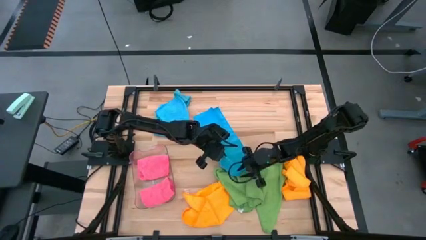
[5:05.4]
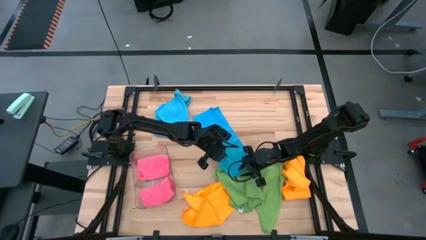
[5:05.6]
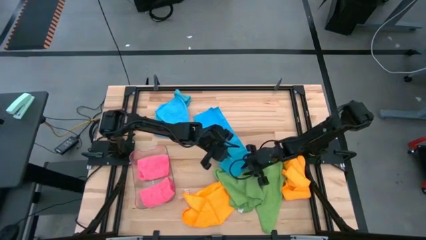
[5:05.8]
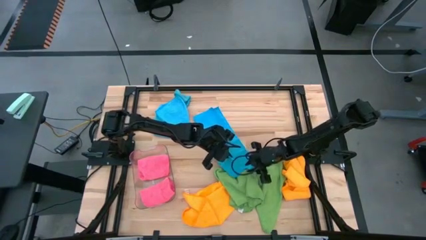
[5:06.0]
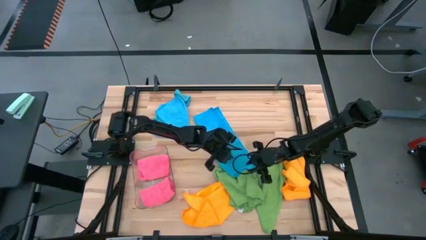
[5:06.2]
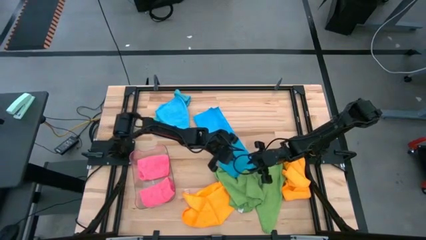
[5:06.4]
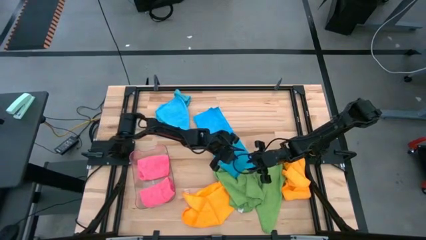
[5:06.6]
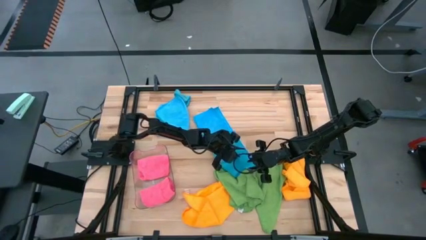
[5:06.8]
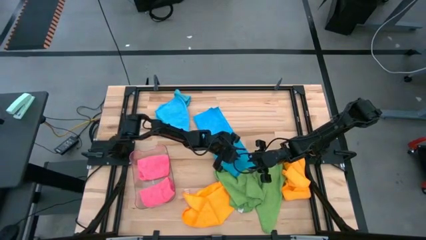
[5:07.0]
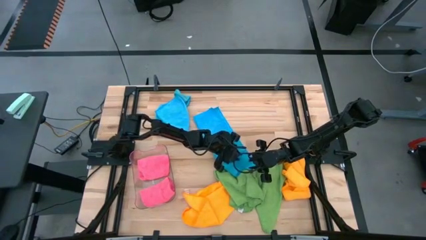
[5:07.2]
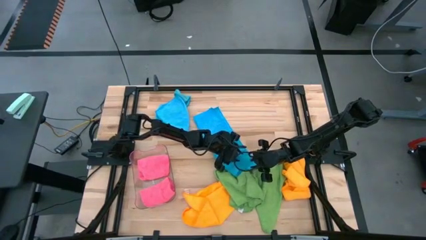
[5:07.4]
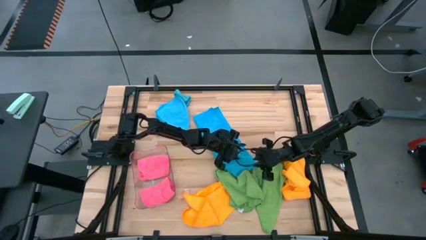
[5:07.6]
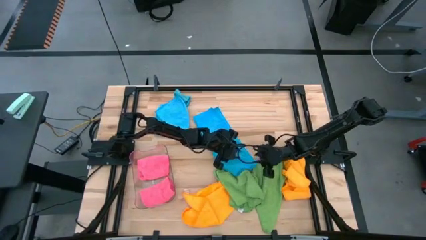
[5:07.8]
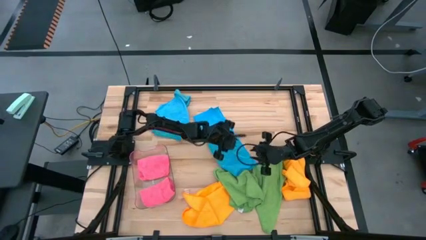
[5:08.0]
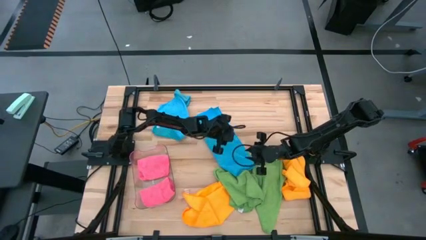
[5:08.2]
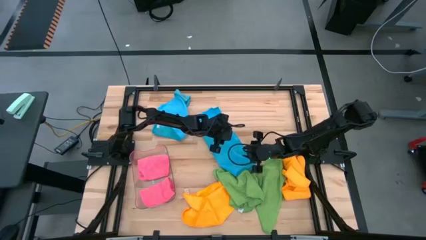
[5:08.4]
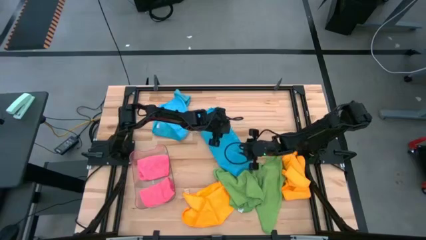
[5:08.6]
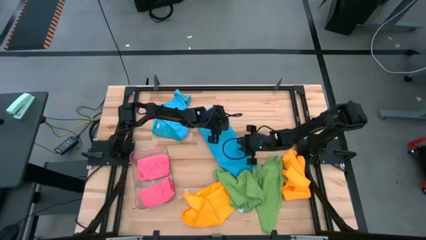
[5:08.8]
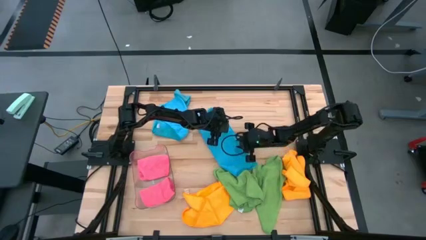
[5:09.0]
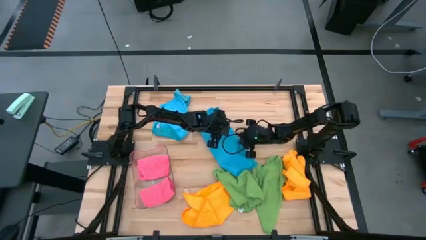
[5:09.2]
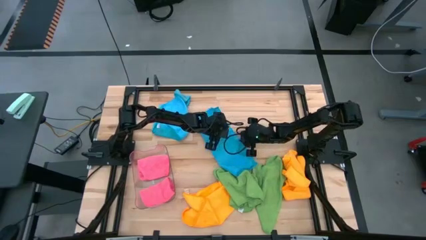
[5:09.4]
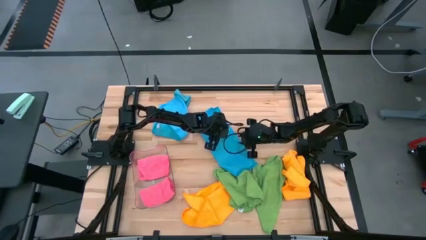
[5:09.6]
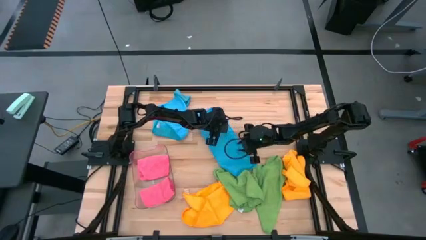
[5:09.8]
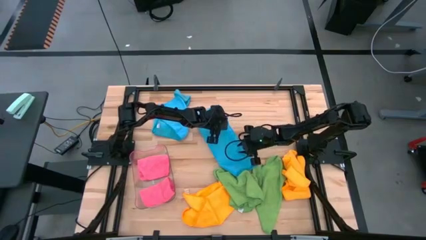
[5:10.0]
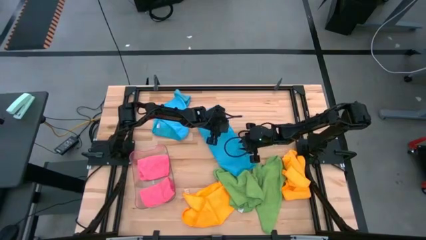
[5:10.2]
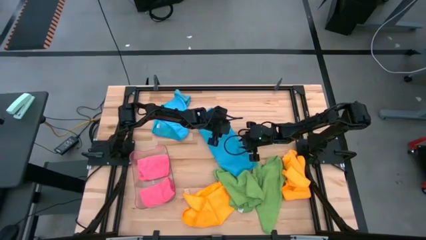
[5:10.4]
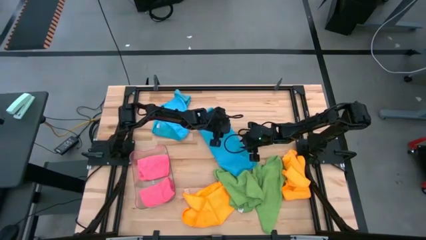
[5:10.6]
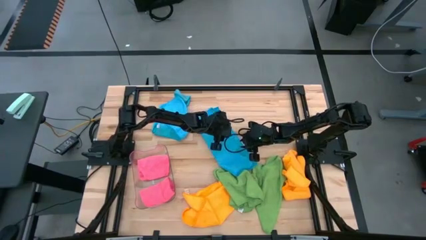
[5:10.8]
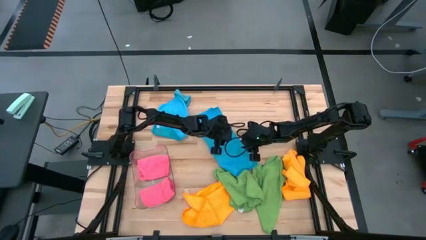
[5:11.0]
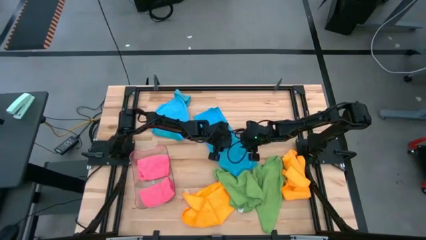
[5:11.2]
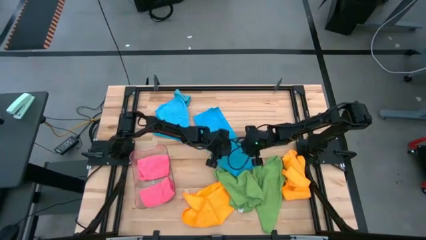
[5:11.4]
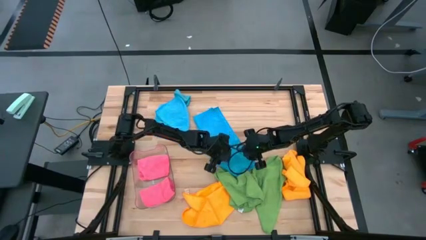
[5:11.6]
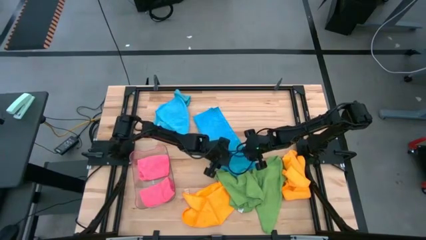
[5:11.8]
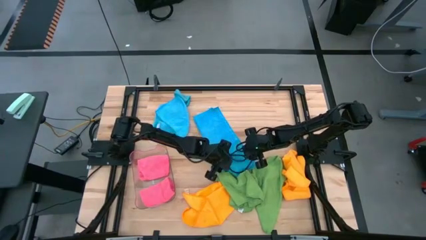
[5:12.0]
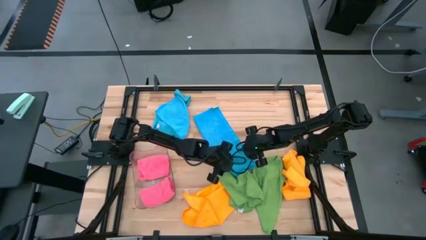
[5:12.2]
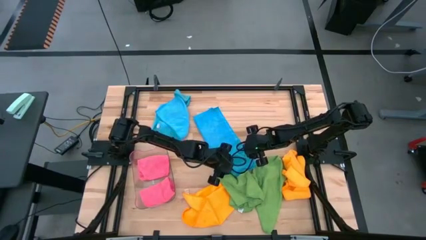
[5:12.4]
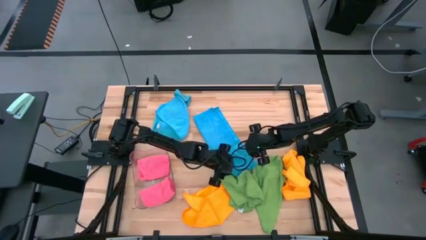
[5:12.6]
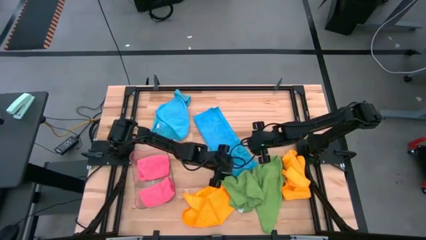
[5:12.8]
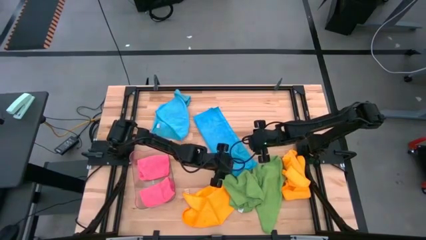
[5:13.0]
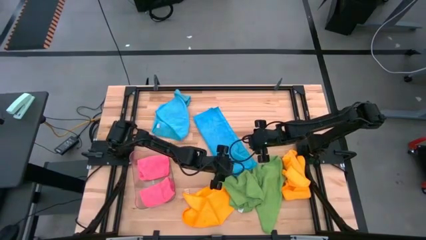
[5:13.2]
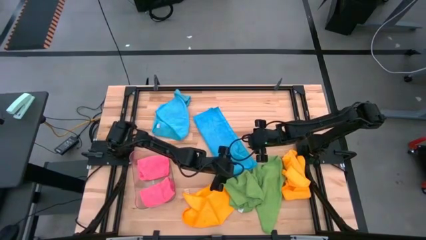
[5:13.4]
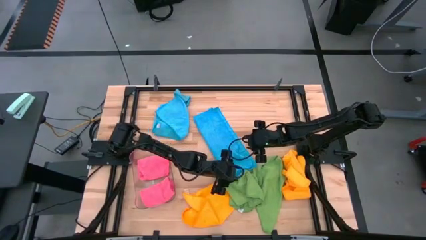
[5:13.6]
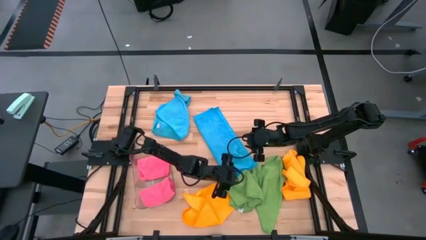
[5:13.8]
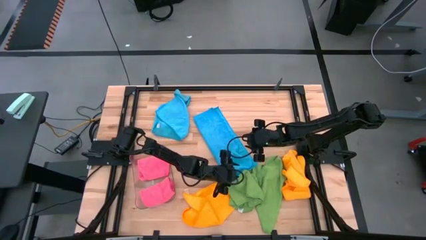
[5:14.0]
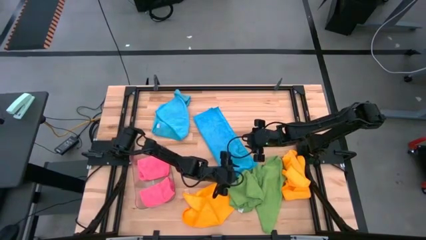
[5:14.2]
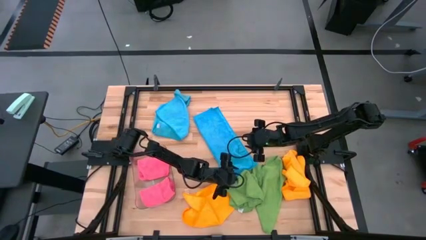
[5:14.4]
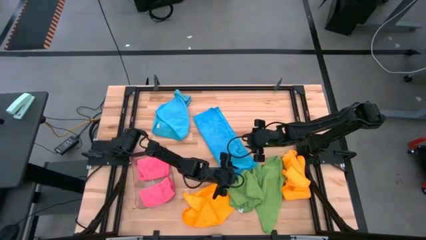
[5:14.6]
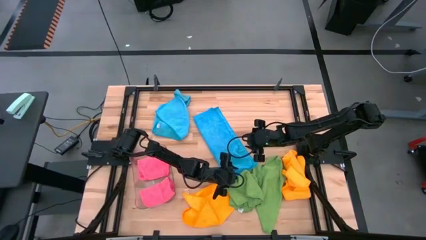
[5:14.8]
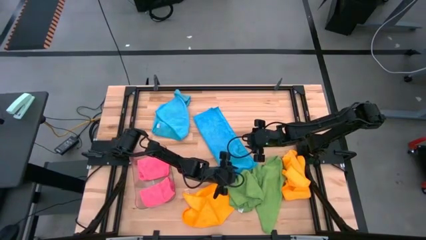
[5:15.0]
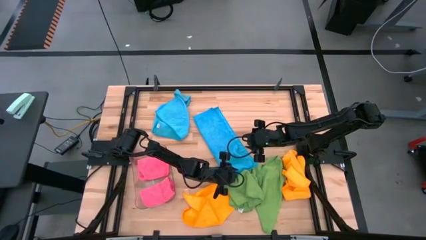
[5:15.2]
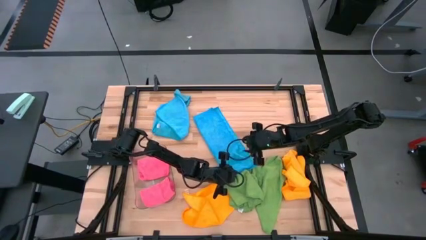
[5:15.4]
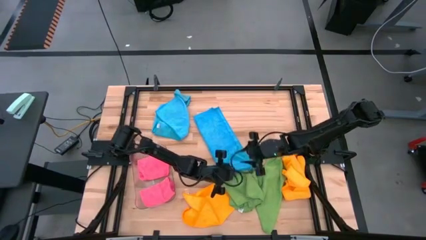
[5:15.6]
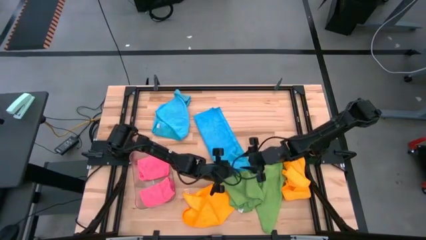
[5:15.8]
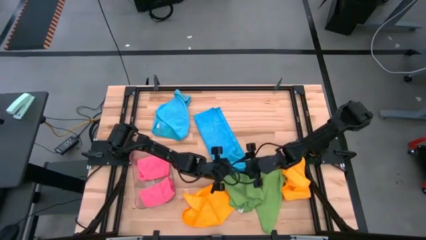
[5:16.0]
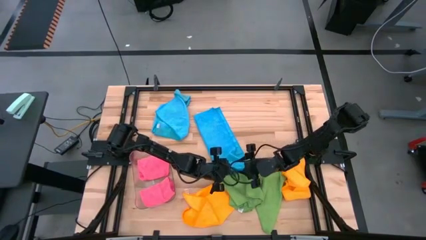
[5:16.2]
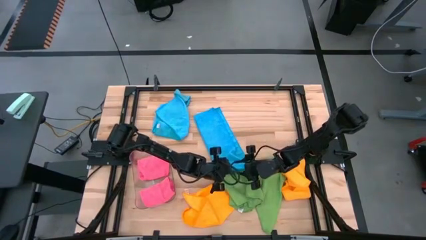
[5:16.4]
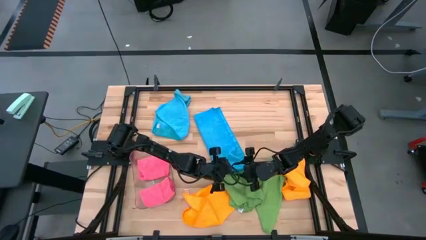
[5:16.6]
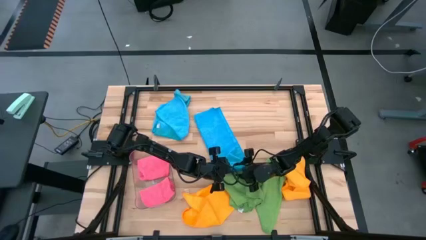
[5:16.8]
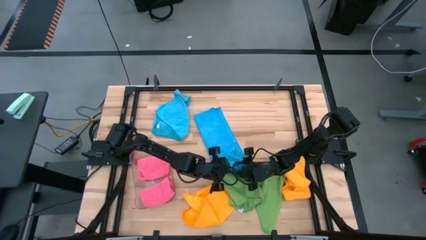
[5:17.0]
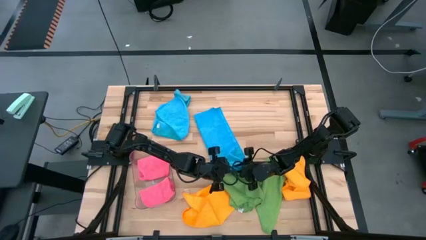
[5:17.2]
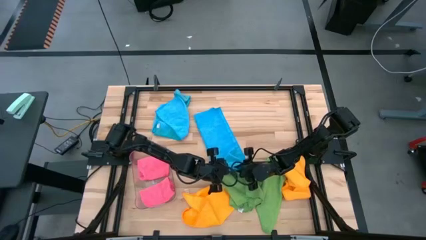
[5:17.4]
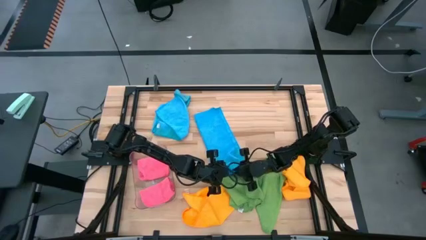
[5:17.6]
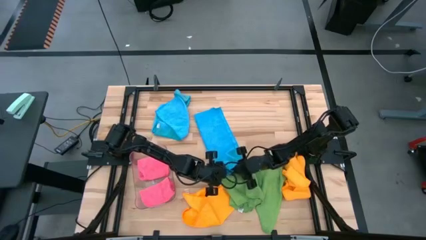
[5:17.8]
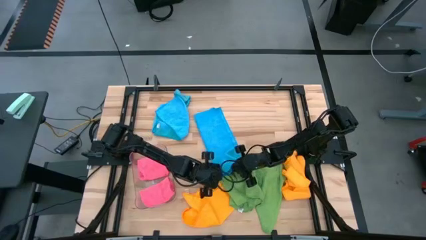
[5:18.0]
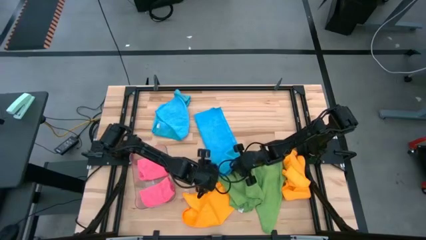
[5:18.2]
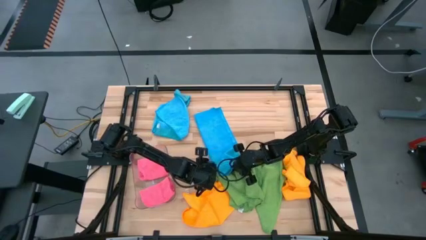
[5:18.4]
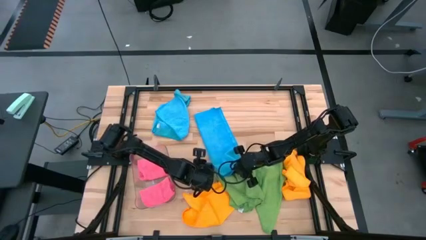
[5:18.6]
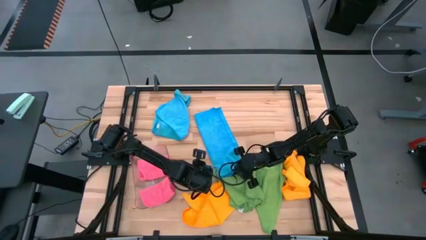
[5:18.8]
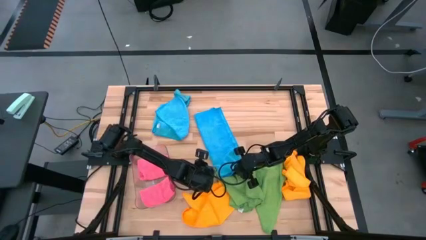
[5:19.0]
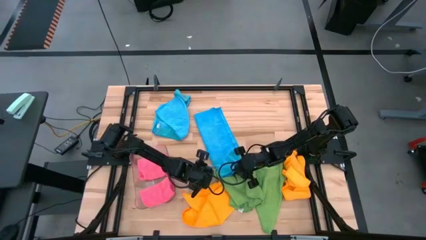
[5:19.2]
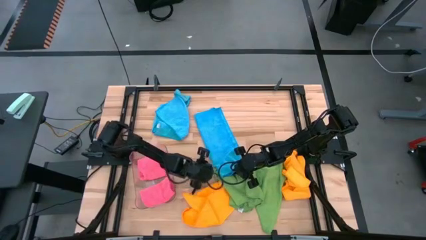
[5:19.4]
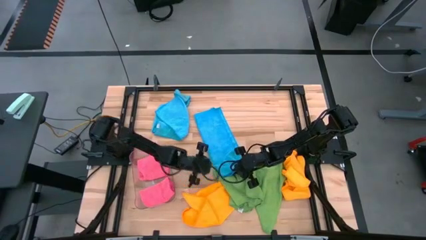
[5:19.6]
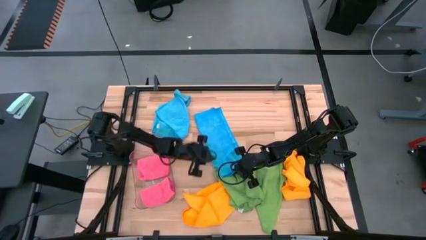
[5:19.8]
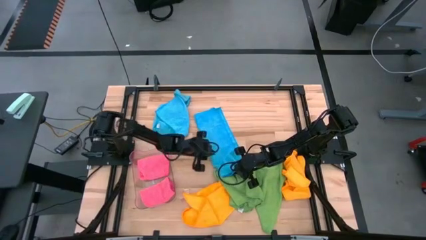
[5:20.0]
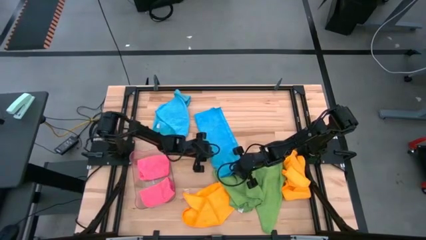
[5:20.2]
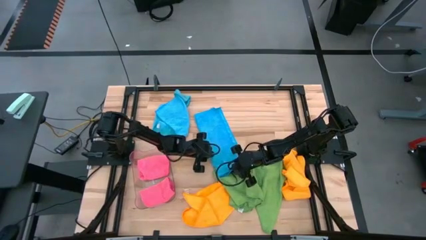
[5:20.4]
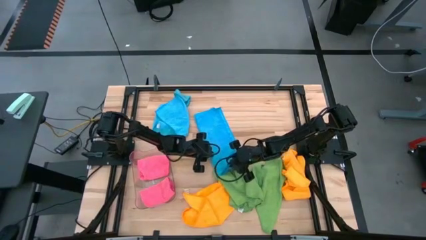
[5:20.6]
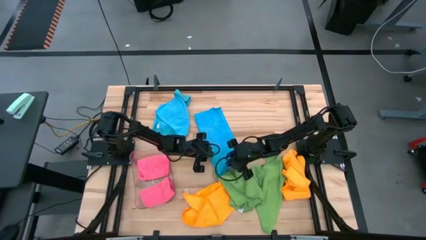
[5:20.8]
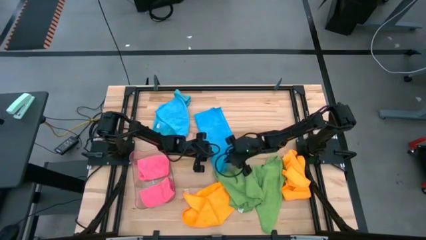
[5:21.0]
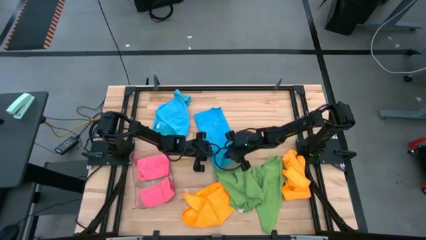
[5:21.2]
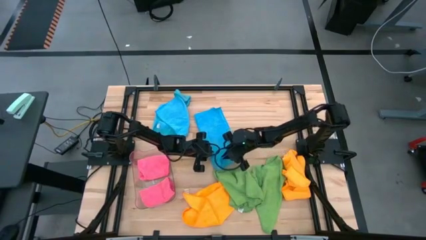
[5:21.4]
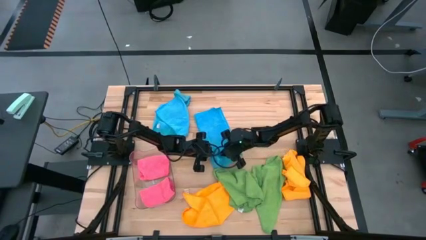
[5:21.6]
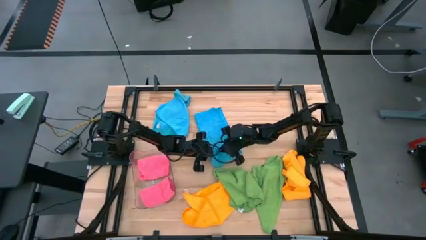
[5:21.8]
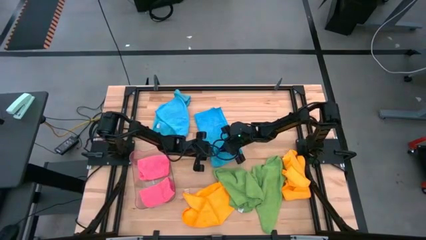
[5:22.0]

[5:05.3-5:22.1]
Task: Fold microfiber towels
Fold the bottom blue microfiber cloth
